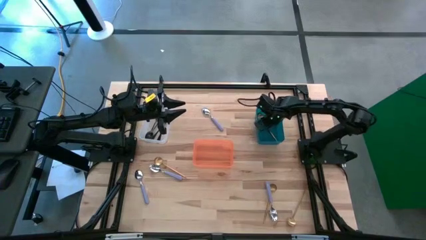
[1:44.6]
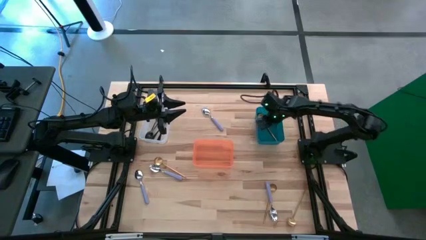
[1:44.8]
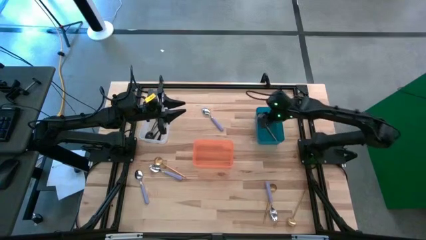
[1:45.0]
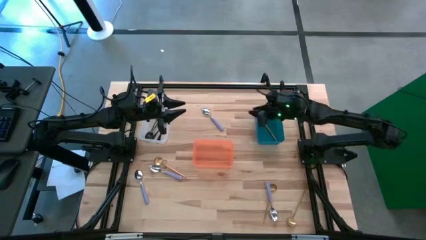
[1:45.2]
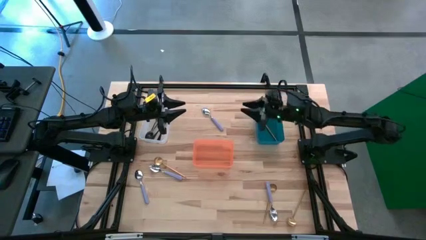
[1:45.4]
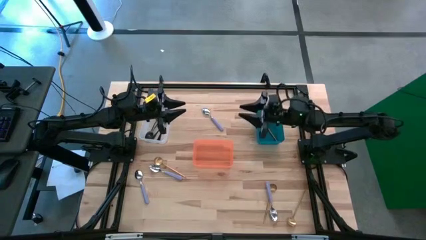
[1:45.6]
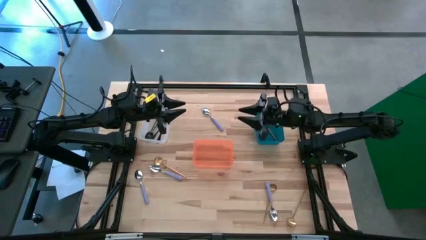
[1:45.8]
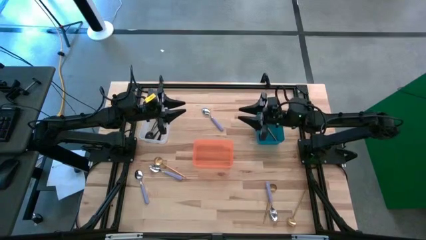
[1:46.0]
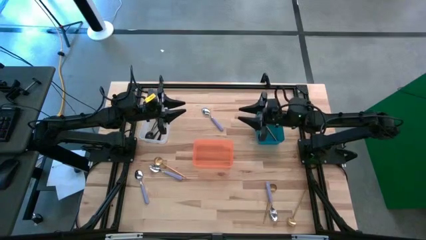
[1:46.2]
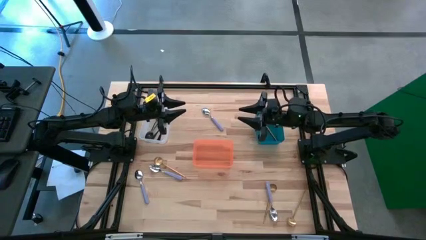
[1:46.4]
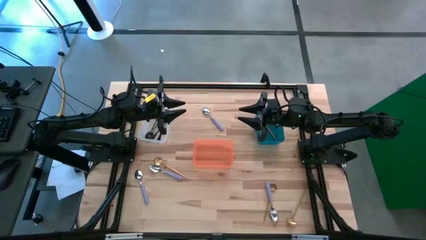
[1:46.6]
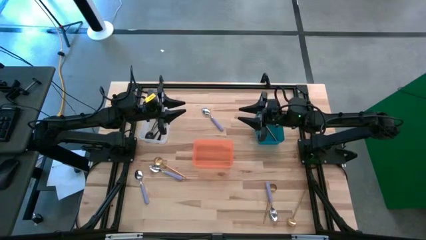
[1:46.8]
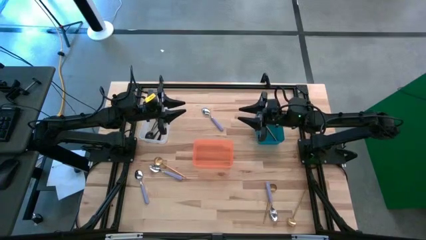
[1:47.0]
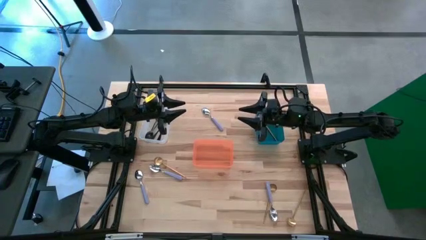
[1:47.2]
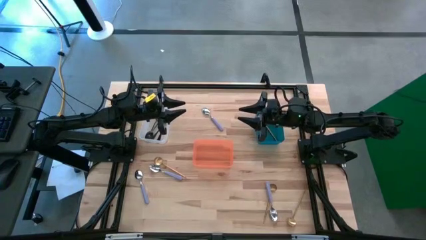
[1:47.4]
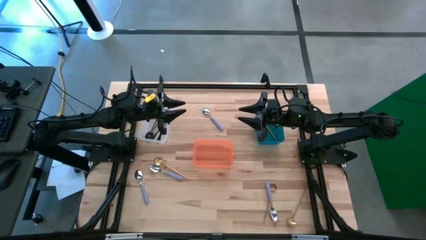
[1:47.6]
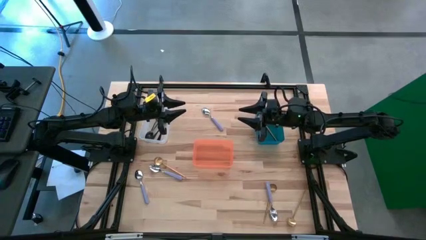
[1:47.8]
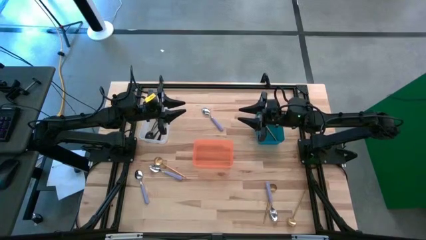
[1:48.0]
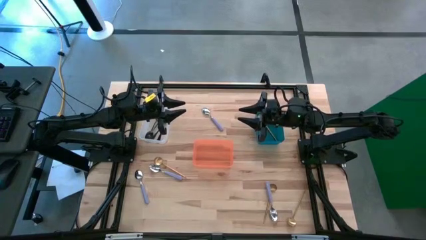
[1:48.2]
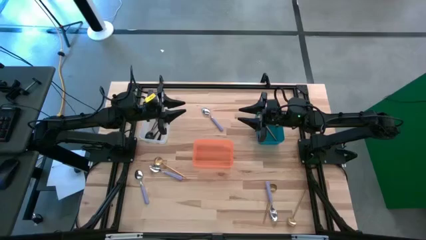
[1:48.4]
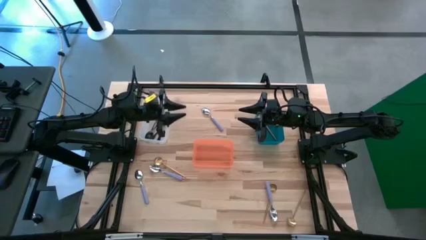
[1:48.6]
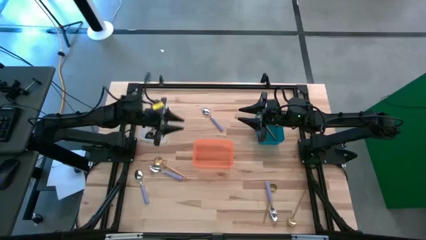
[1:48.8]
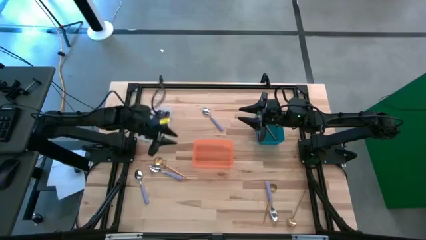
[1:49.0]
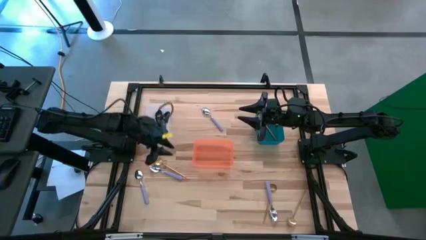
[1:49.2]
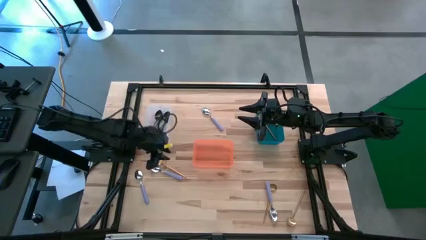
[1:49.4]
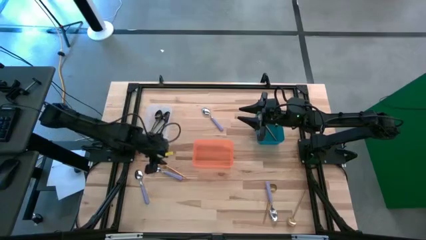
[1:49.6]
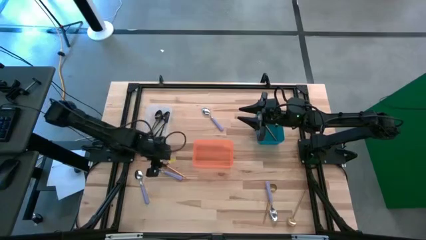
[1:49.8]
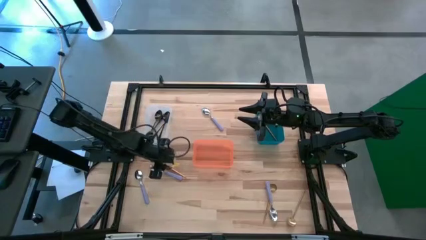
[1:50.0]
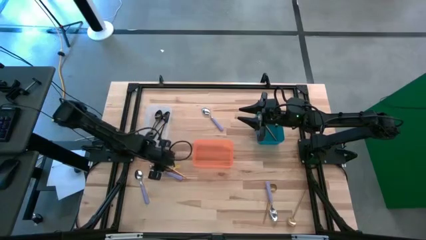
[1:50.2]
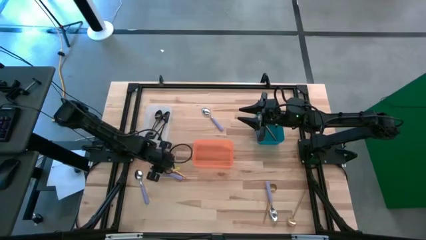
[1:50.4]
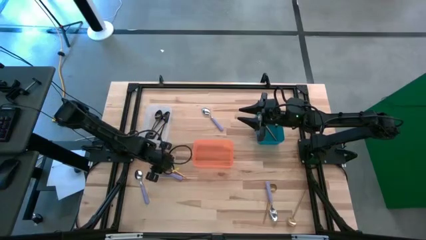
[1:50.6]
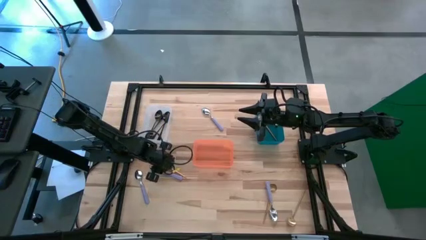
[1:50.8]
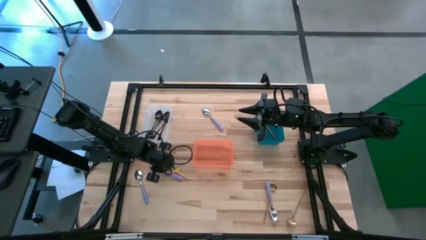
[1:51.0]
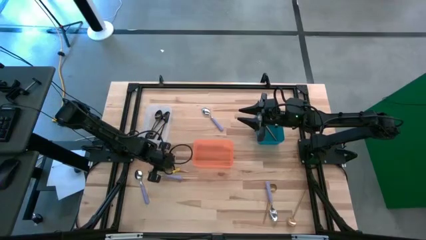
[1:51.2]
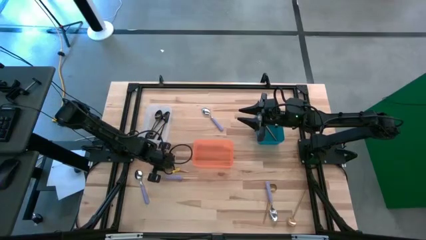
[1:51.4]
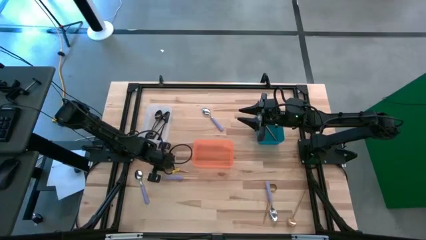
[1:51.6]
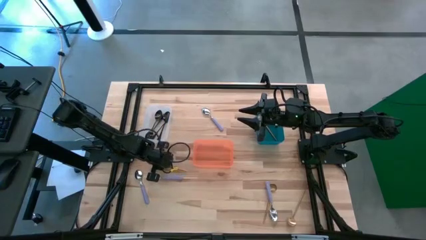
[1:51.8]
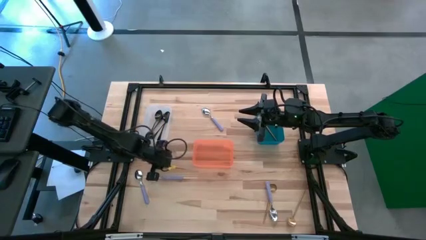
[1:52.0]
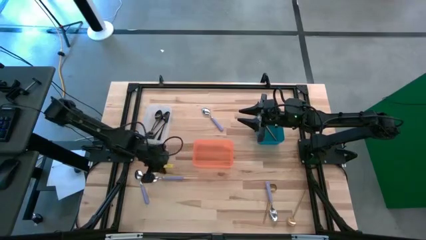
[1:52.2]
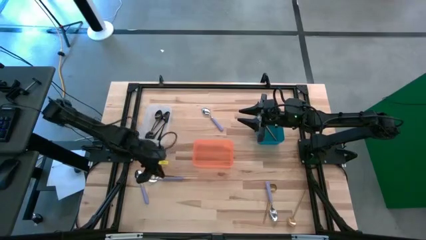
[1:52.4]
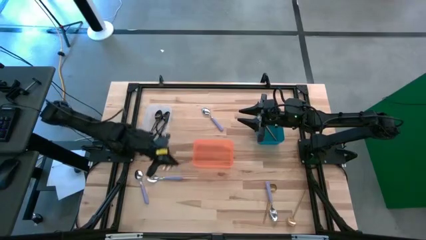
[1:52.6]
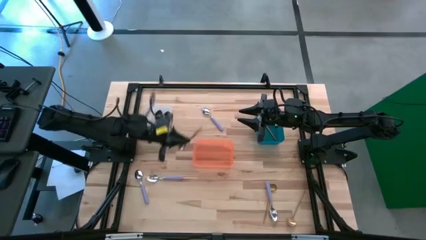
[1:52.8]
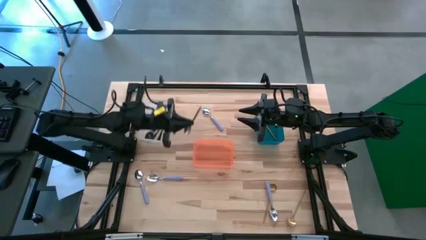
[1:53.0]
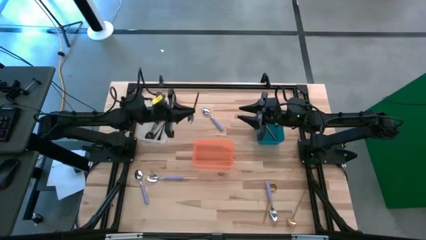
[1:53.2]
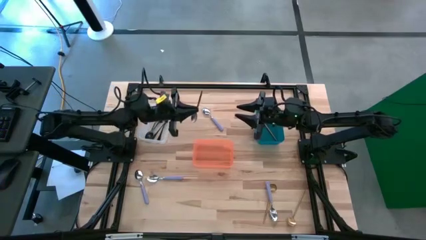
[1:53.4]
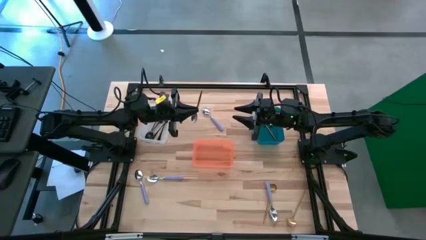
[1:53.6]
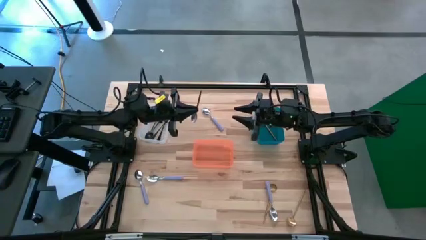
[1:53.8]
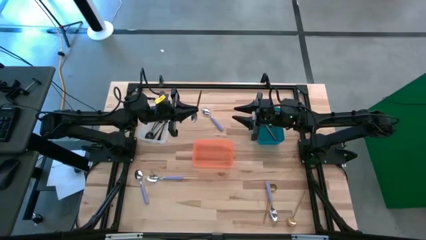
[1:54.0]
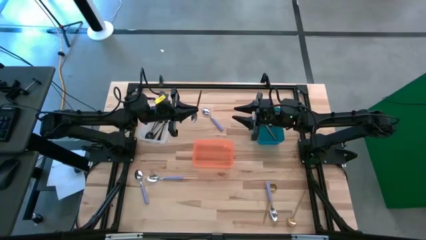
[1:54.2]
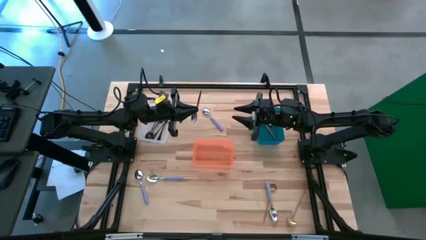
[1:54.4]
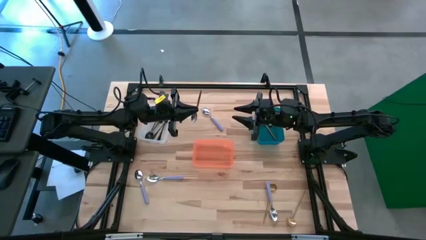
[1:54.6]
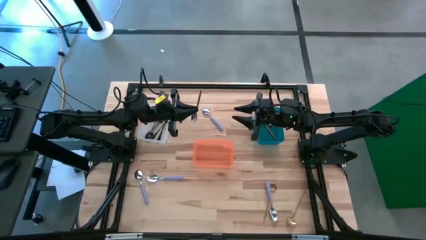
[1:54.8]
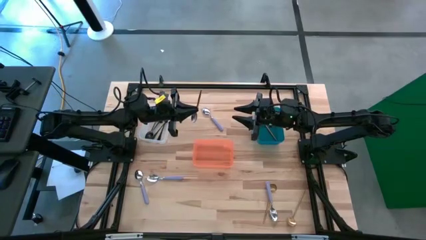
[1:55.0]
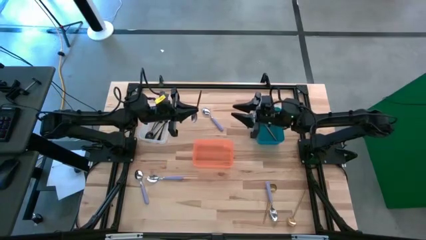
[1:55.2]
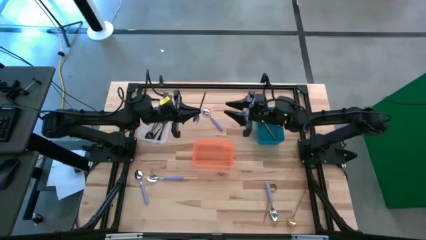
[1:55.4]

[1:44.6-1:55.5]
Task: Sort silverware by color (type)
Put the left gold spoon into the blue bin

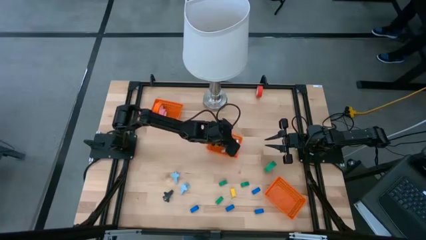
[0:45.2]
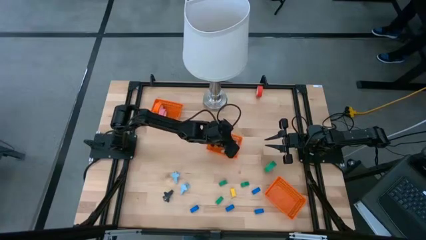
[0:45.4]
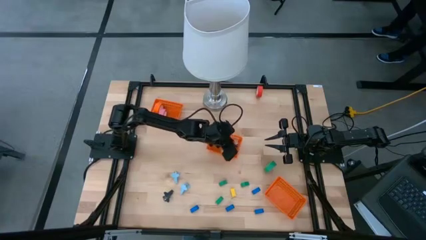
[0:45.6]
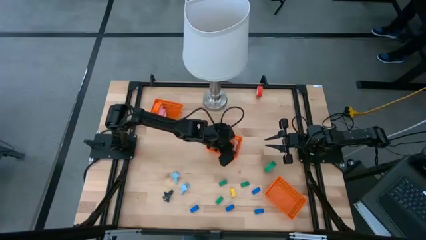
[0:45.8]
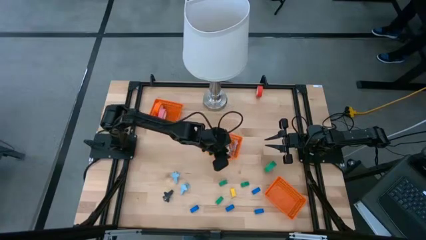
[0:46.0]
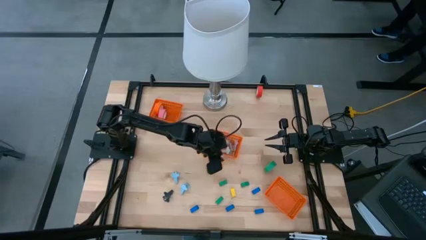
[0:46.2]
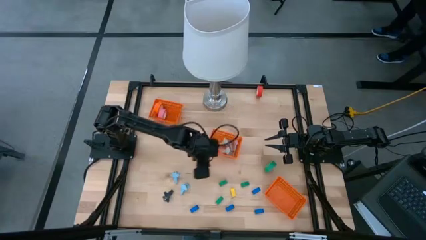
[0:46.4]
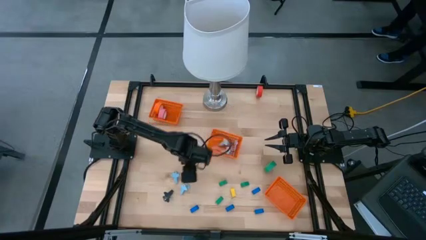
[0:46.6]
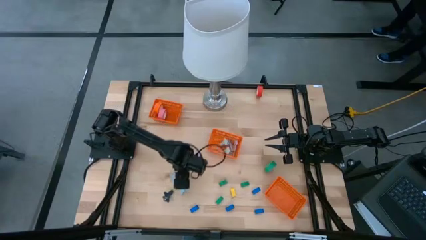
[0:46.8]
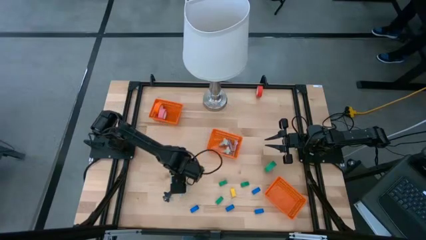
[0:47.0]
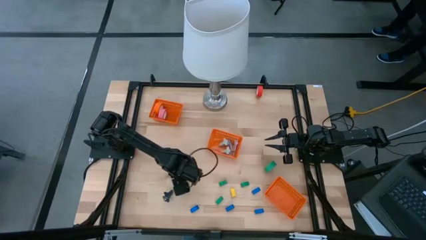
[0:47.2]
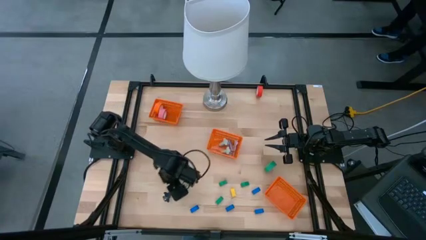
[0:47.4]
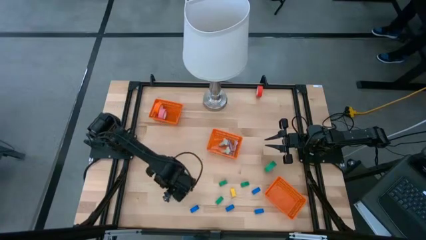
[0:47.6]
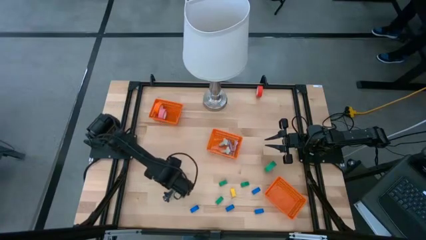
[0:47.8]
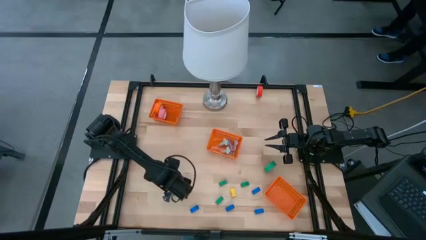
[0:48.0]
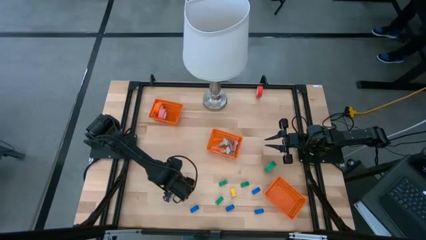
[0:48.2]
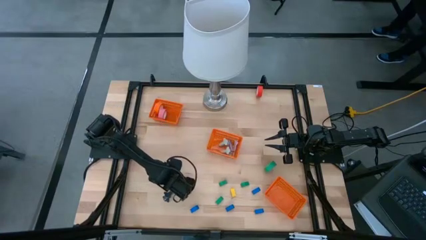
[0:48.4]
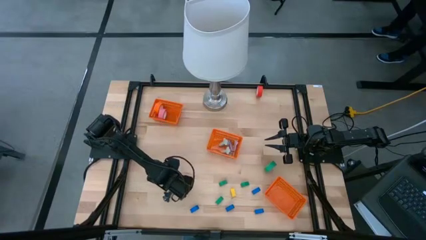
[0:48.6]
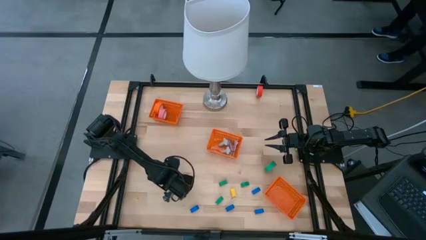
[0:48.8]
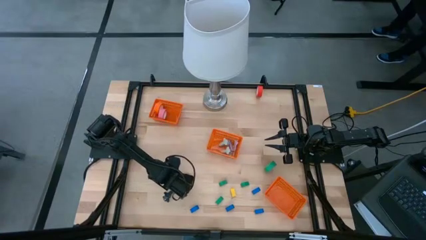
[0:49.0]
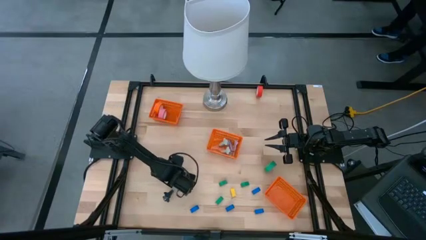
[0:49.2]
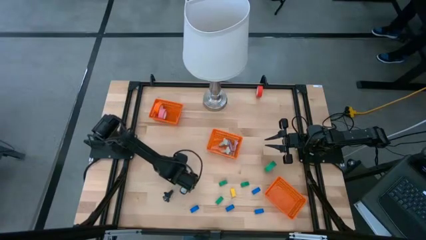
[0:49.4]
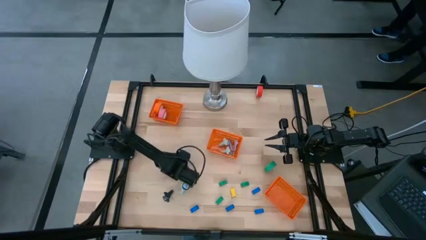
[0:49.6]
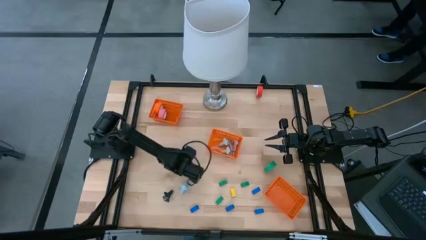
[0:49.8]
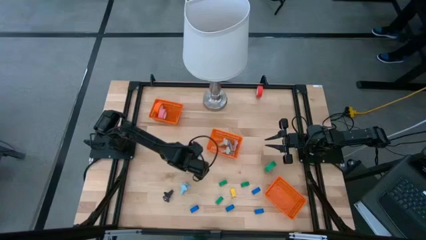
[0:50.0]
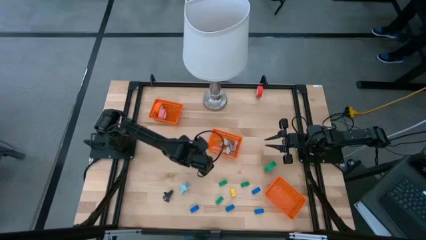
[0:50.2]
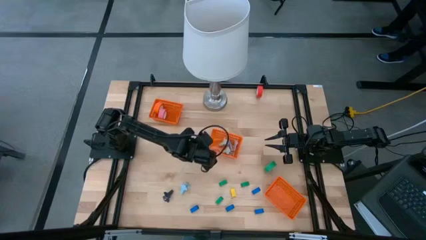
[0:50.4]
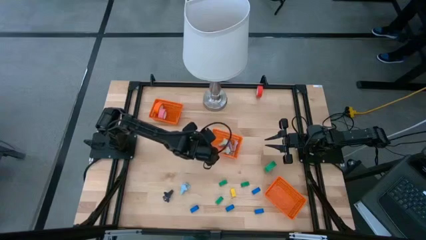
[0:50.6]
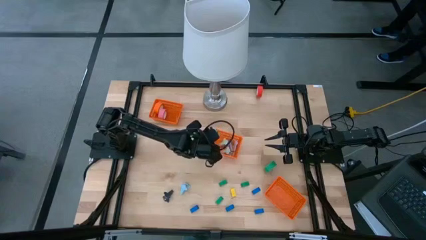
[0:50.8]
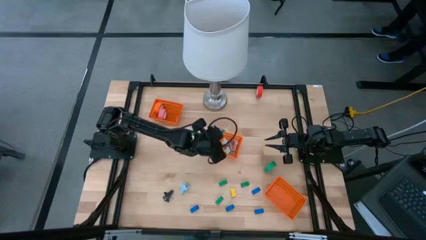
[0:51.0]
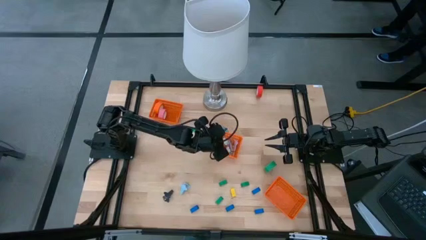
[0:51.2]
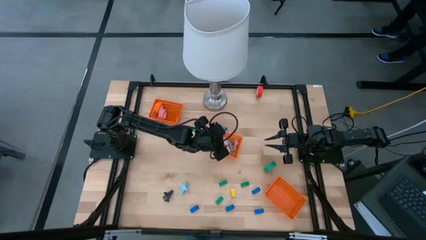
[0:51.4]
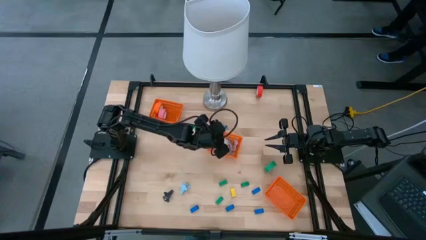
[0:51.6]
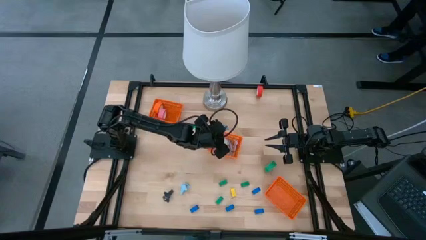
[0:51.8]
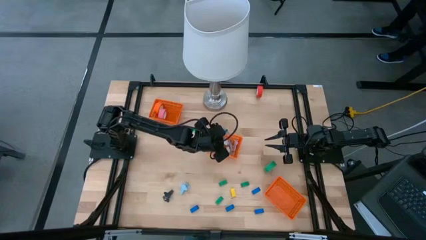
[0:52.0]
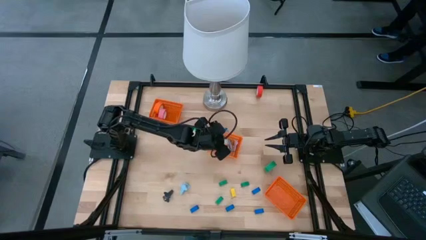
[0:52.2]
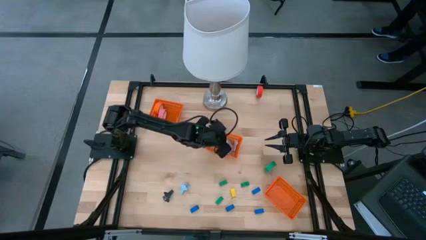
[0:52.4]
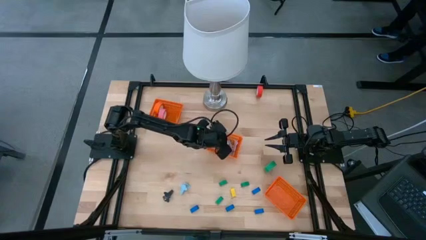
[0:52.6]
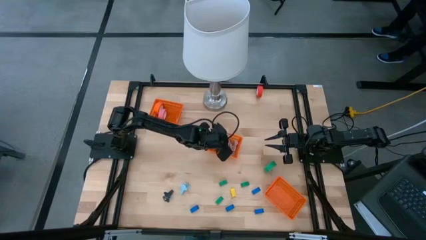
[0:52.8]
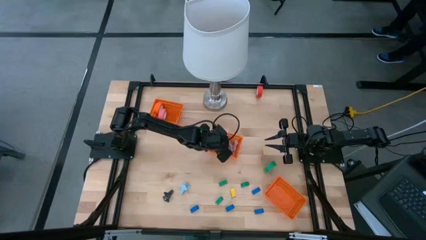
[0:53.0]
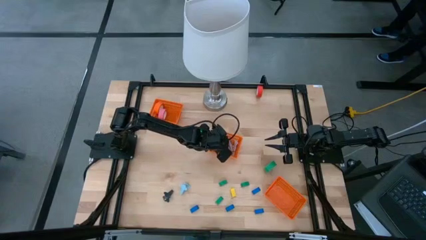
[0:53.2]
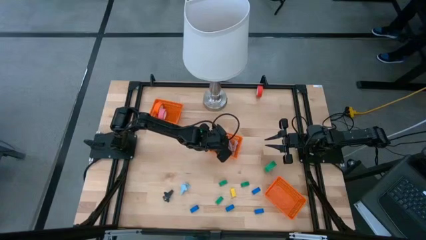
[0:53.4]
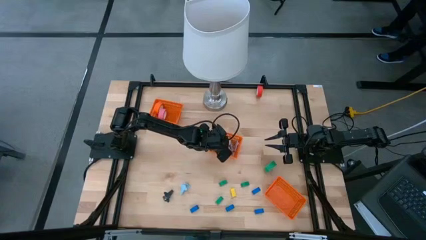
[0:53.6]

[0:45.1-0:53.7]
Task: Pick and place Stapler, Stapler remover, tape
Put the blue staple remover into the middle orange bin
